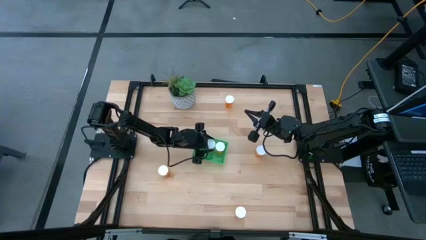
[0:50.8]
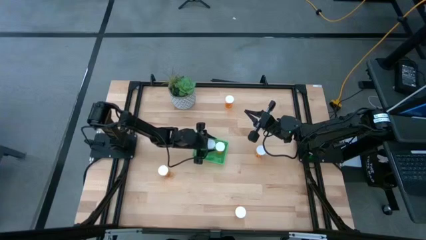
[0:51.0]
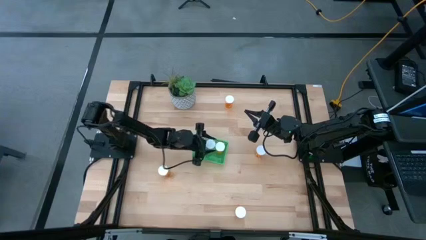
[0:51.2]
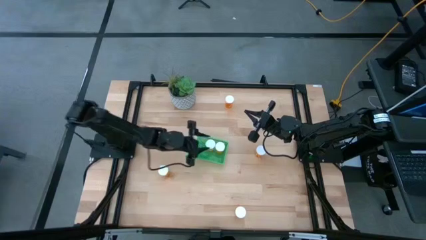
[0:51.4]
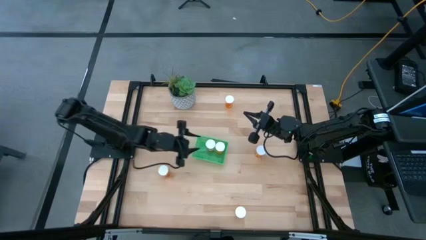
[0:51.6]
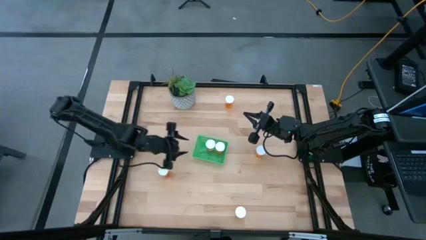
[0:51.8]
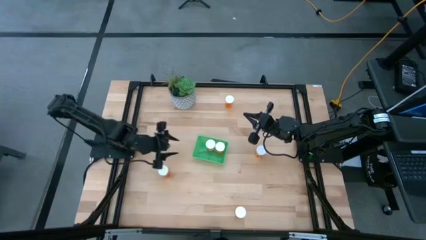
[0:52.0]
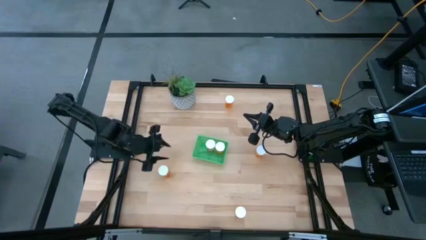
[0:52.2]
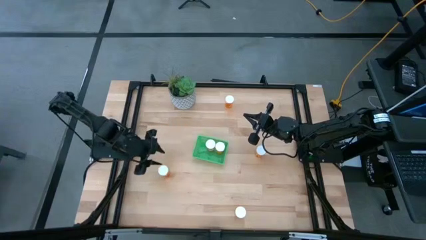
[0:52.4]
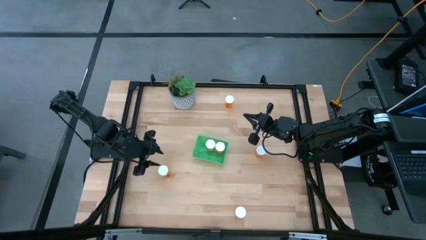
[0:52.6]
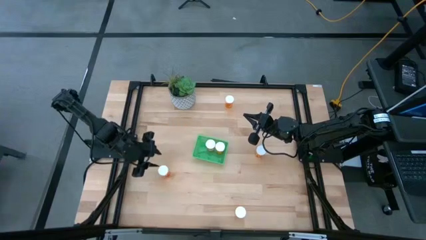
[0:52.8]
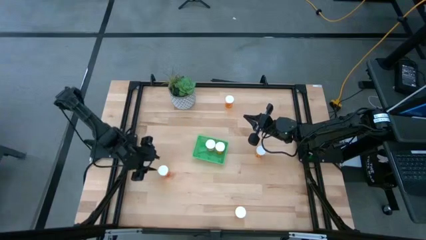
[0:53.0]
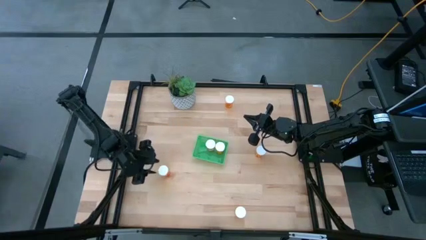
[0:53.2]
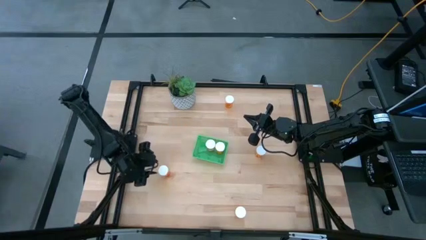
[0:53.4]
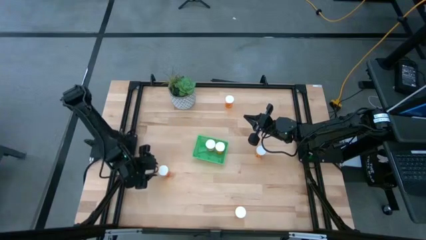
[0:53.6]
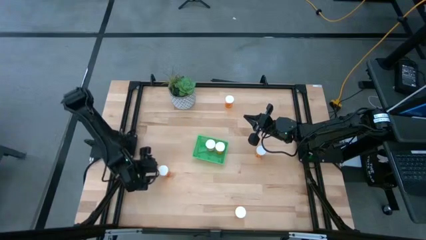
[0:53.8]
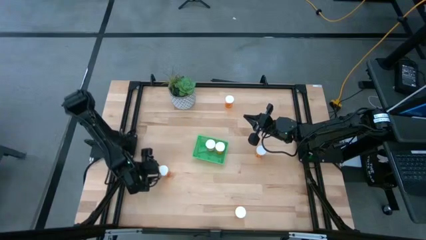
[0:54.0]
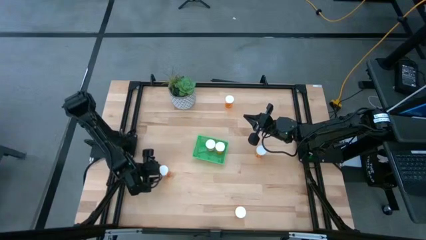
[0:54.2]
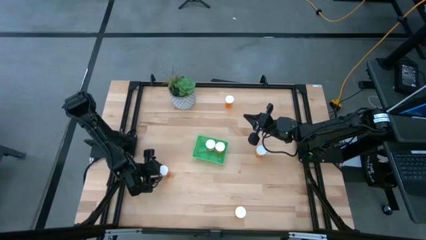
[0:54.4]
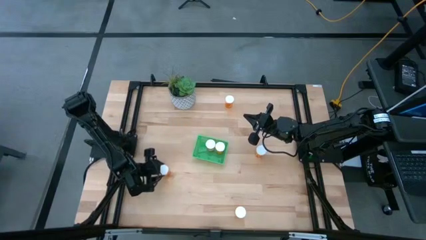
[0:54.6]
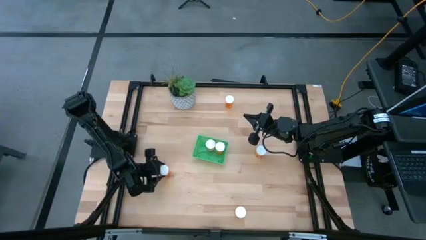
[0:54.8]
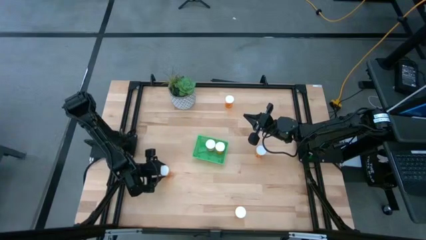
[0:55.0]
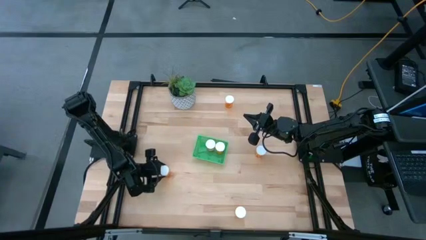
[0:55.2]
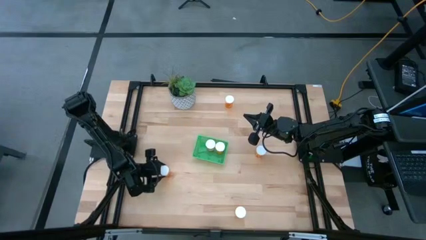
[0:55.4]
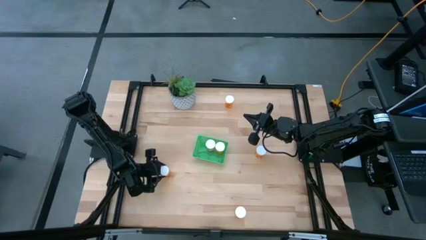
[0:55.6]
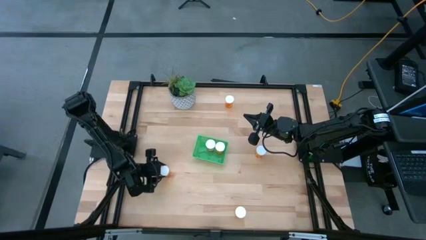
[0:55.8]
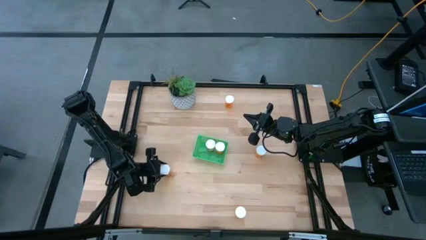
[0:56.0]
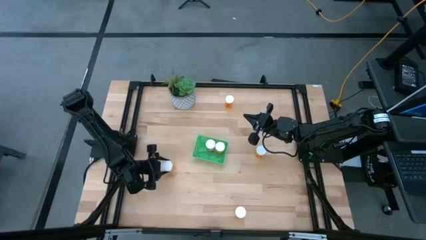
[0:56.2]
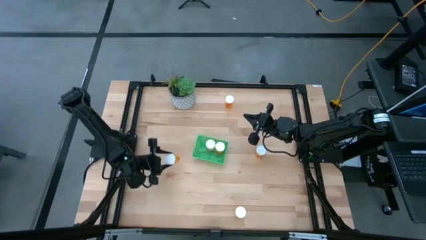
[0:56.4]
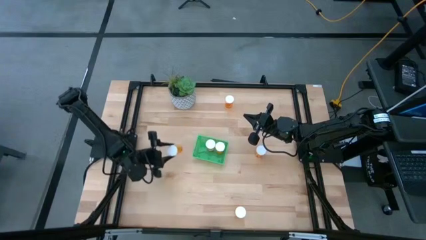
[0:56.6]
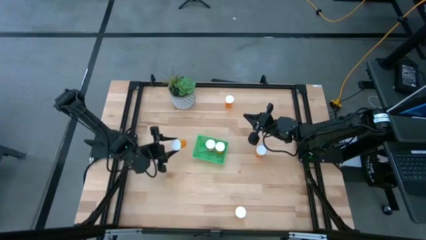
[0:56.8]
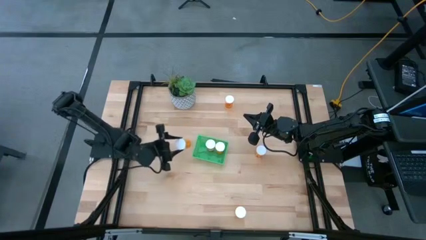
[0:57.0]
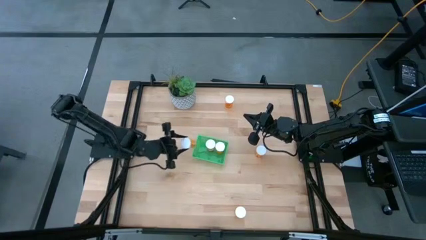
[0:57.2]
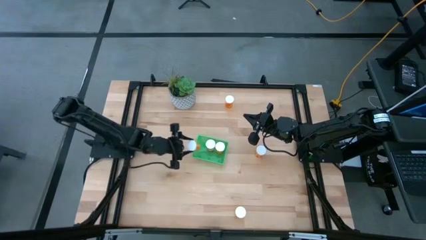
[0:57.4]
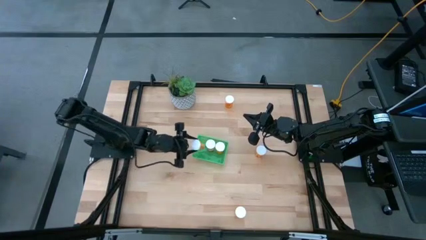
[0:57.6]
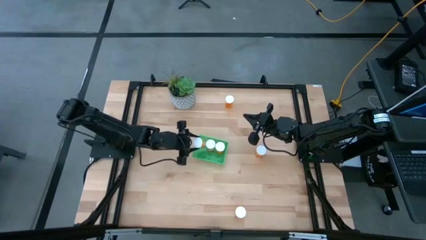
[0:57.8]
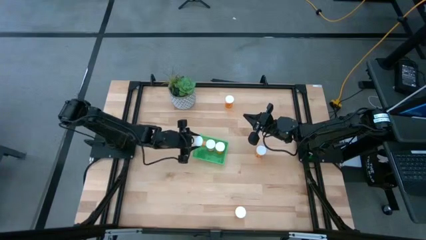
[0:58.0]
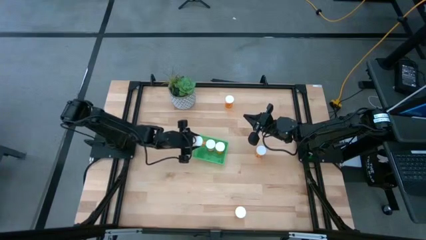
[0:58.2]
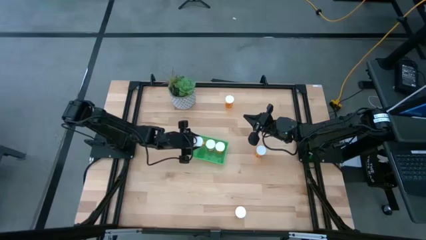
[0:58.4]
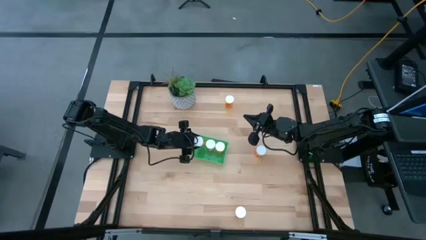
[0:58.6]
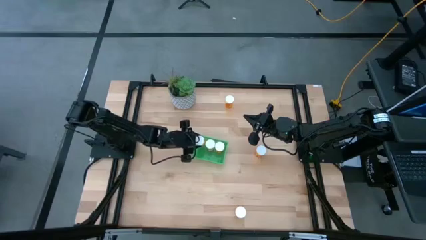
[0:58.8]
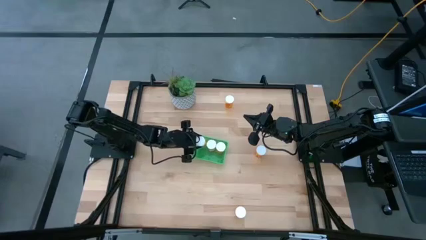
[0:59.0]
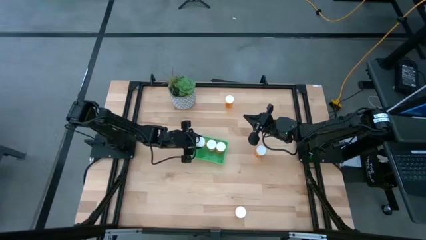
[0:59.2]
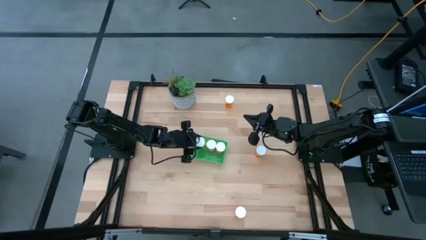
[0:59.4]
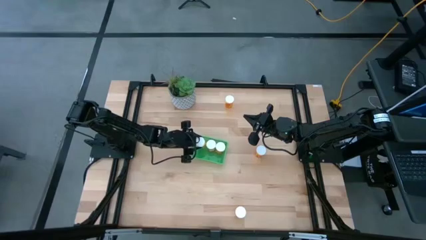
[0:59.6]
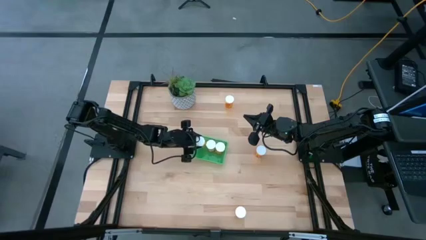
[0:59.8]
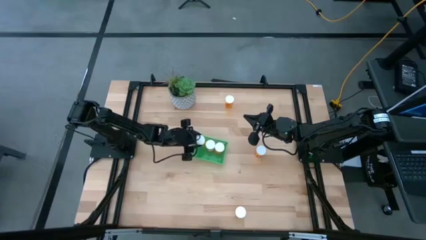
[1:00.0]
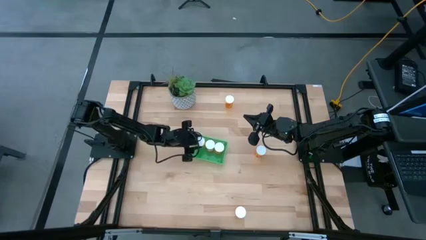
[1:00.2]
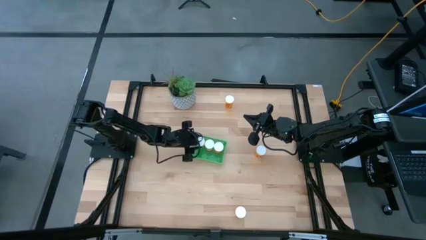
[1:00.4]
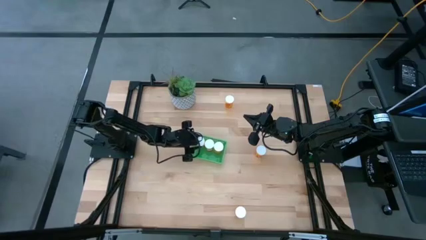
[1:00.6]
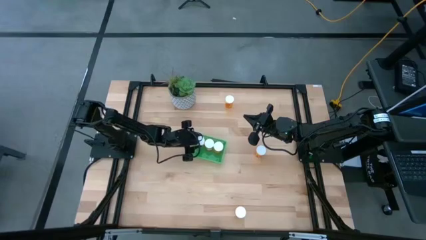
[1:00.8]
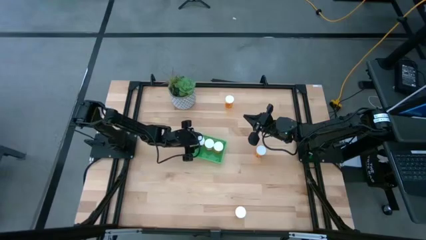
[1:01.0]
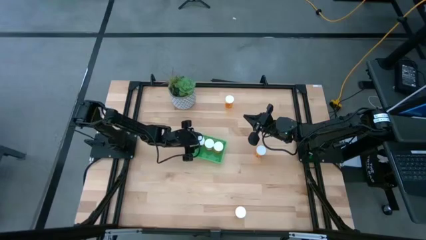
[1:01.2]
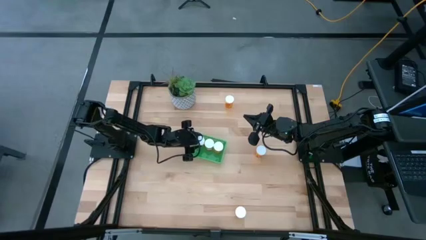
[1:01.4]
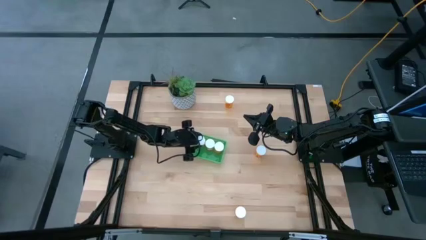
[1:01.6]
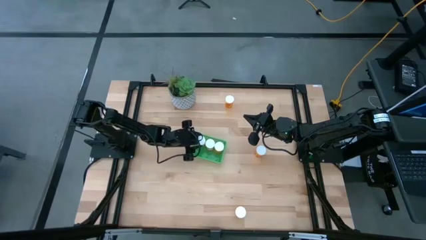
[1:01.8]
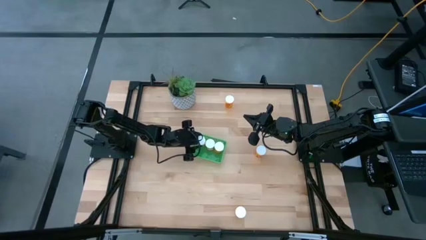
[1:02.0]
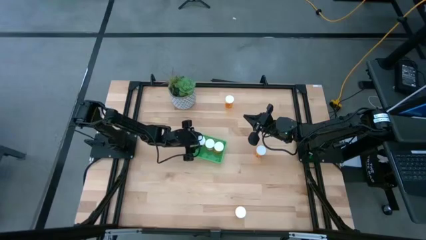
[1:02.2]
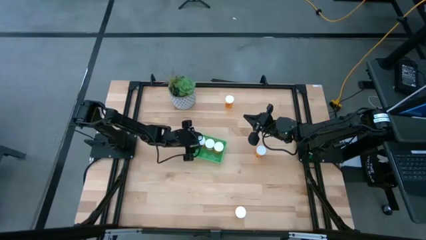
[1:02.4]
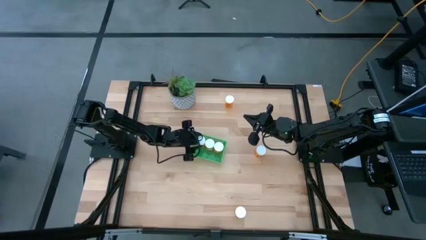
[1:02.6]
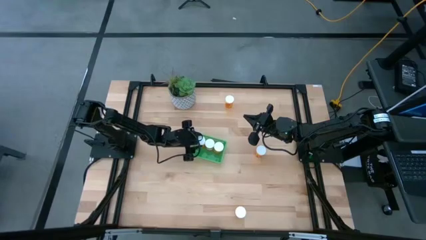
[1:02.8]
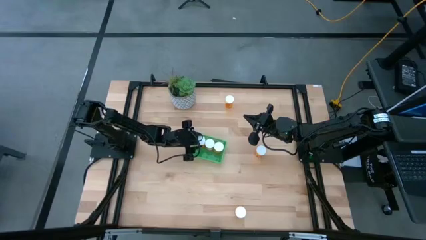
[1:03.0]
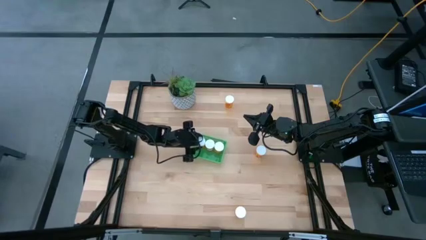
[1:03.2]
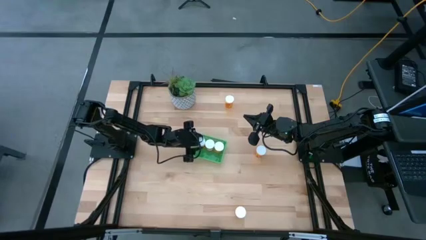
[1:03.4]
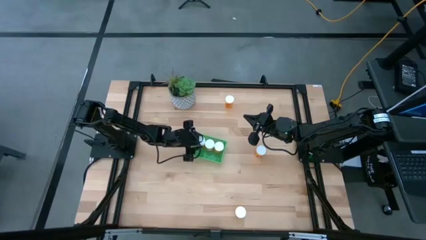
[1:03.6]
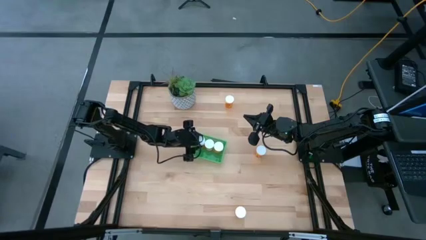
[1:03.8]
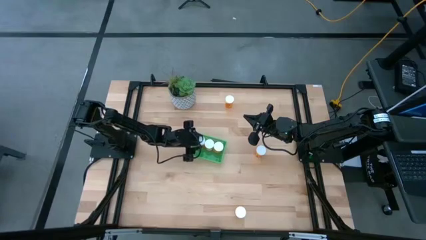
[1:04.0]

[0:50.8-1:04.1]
Task: Pick and place pill bottles into a basket
Put the orange medicine bottle into the green bin
